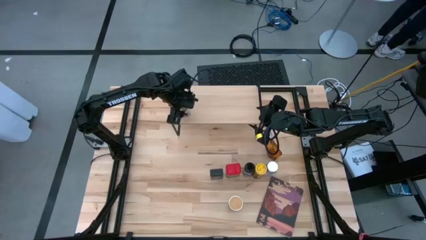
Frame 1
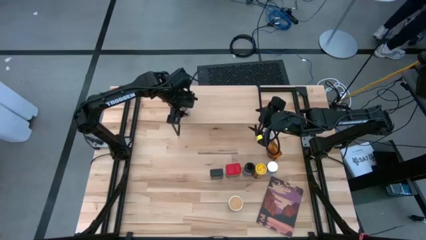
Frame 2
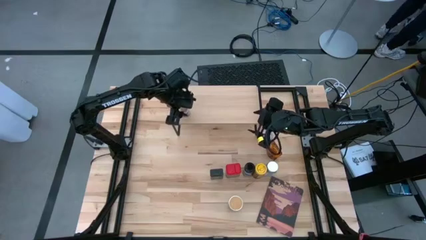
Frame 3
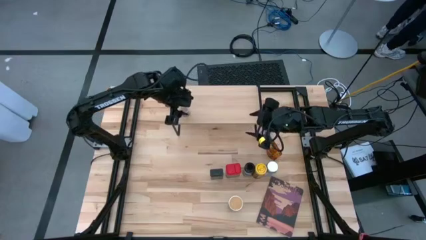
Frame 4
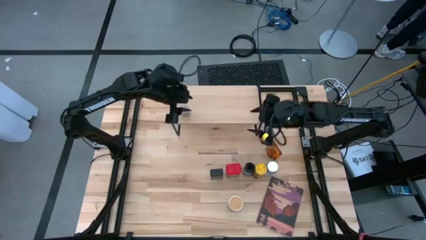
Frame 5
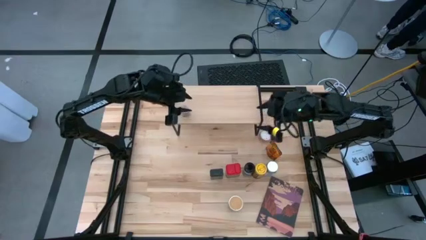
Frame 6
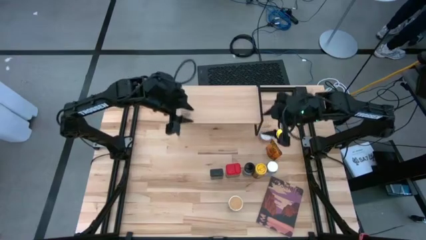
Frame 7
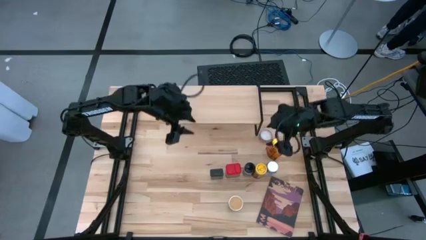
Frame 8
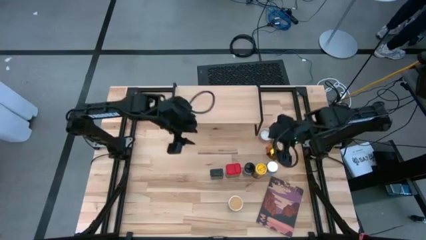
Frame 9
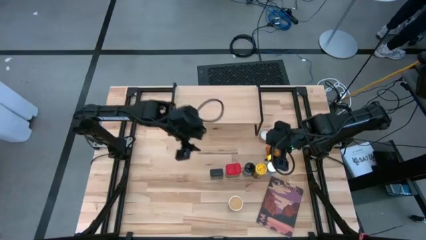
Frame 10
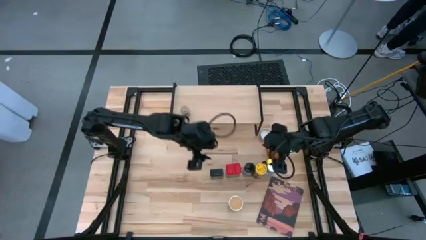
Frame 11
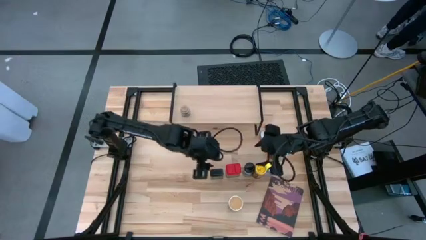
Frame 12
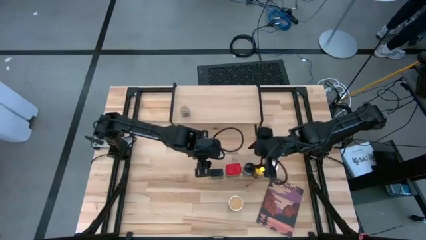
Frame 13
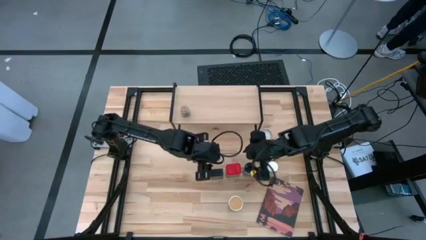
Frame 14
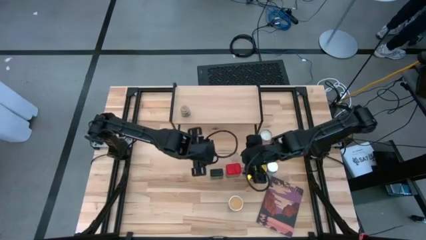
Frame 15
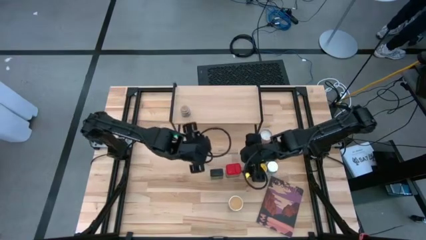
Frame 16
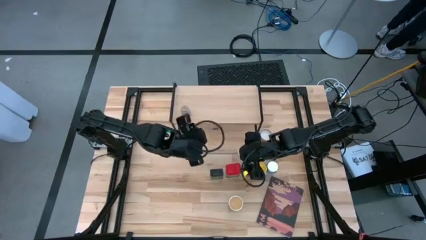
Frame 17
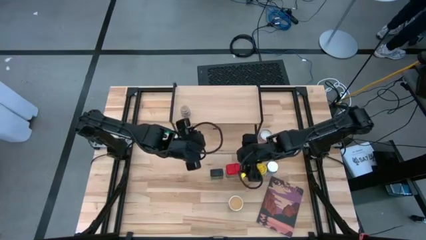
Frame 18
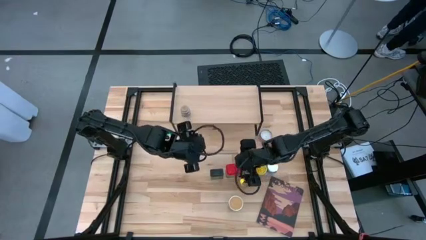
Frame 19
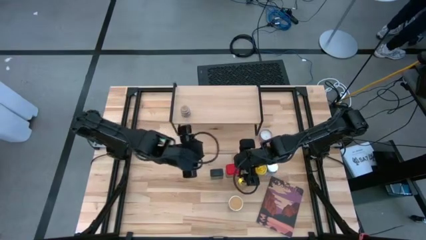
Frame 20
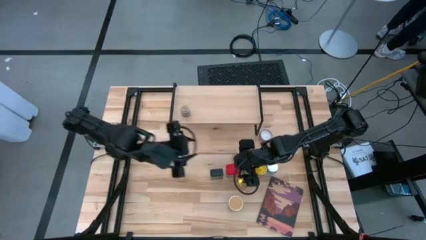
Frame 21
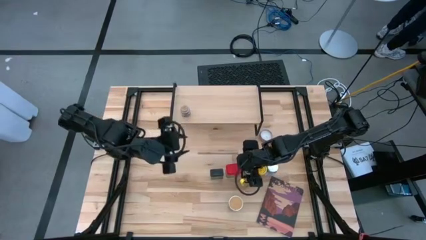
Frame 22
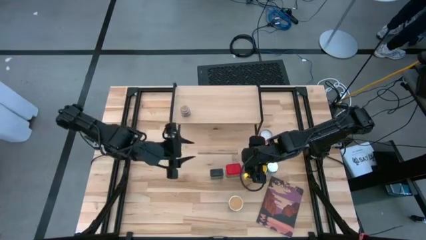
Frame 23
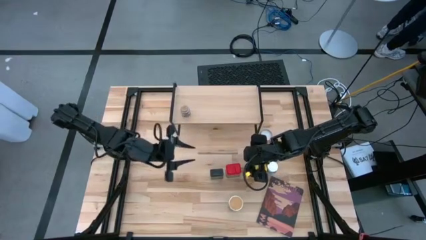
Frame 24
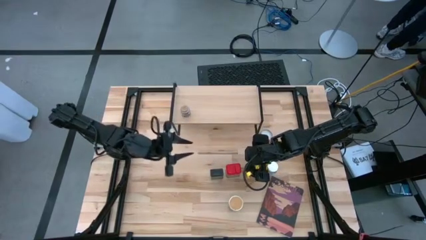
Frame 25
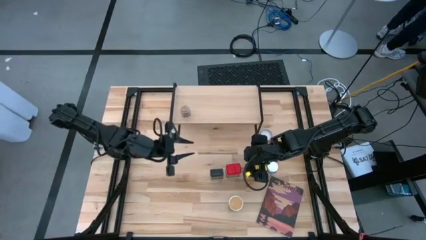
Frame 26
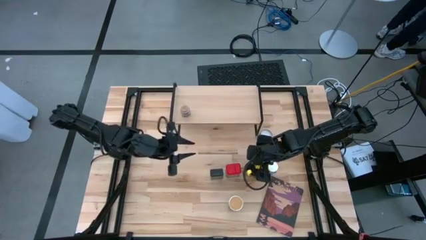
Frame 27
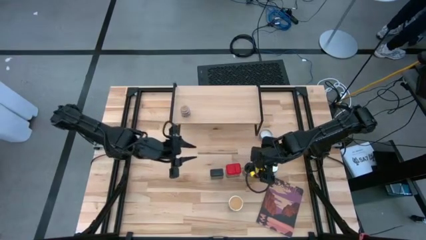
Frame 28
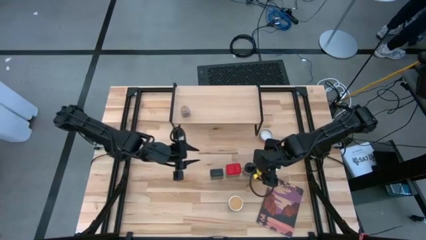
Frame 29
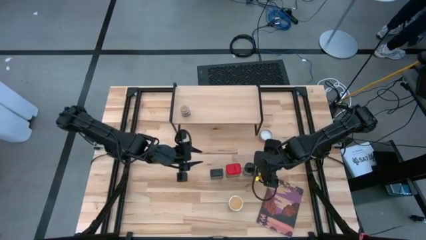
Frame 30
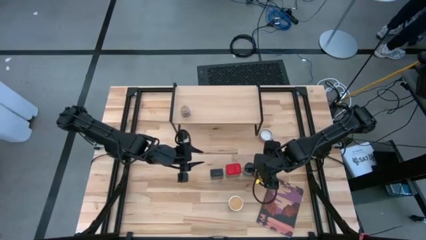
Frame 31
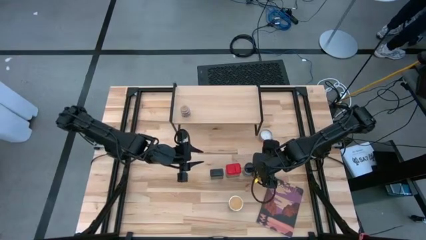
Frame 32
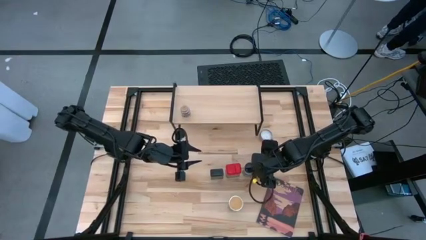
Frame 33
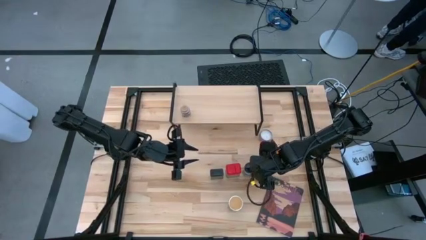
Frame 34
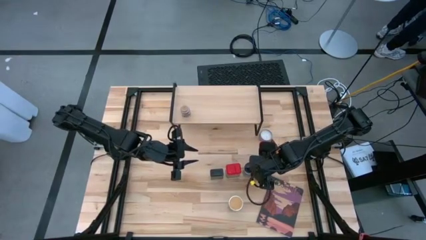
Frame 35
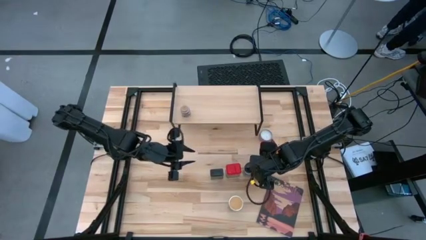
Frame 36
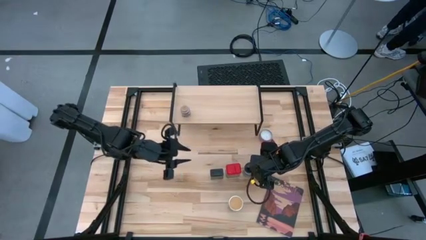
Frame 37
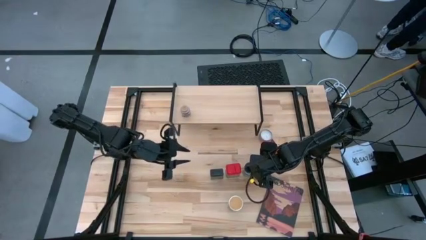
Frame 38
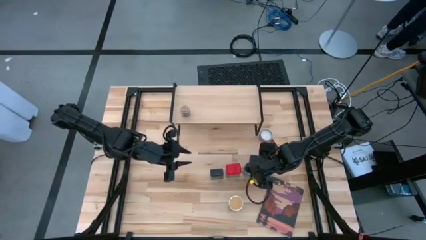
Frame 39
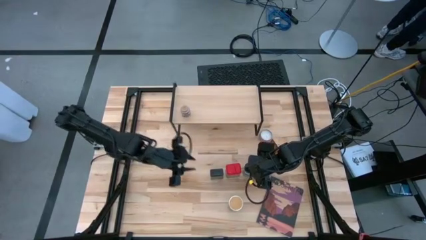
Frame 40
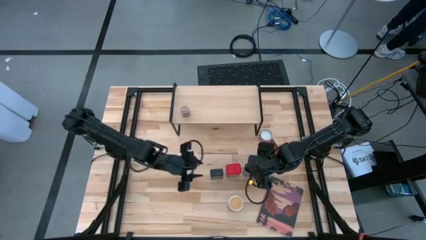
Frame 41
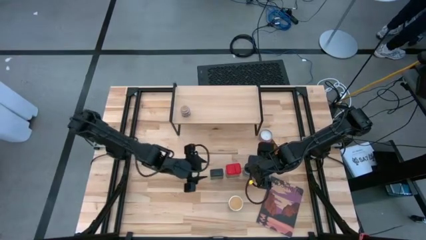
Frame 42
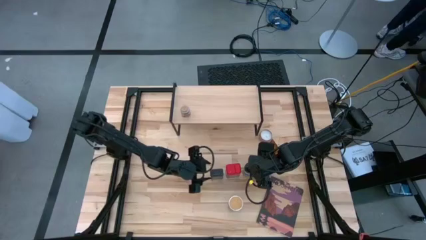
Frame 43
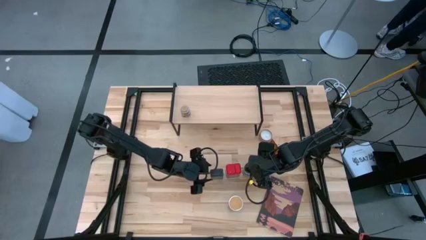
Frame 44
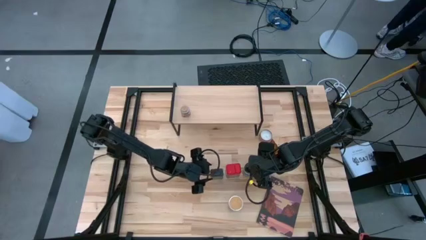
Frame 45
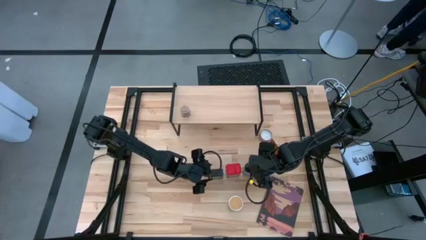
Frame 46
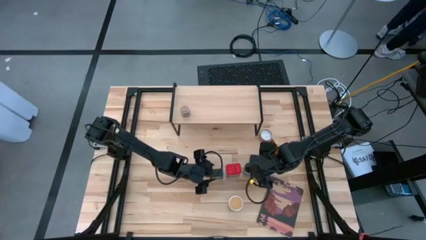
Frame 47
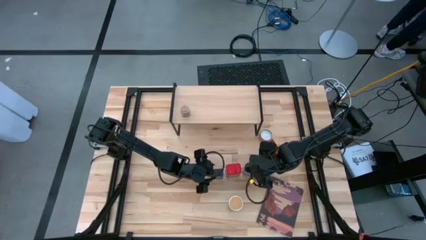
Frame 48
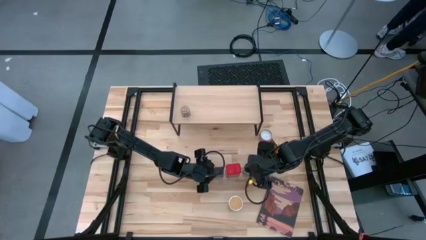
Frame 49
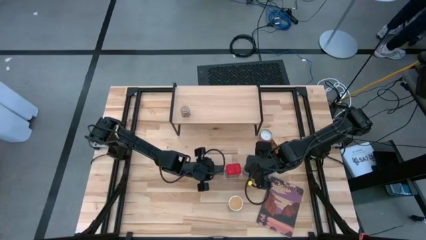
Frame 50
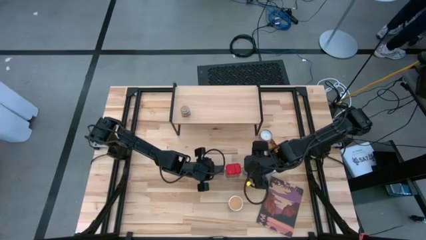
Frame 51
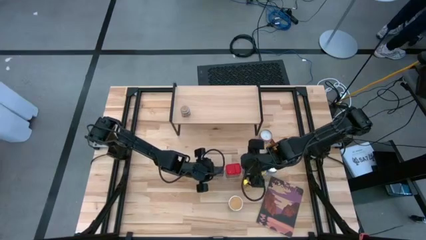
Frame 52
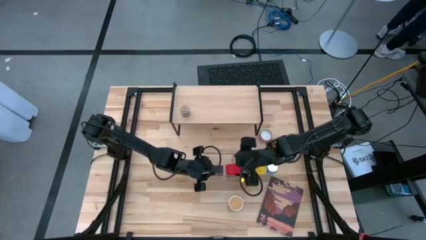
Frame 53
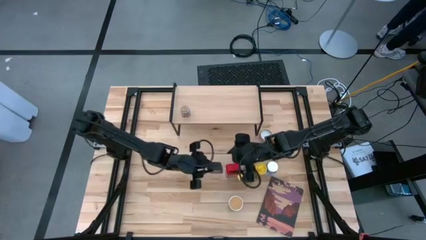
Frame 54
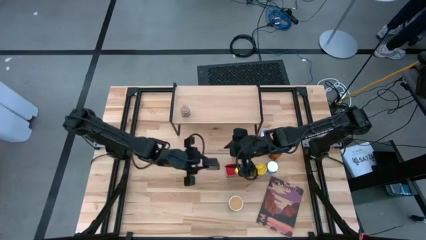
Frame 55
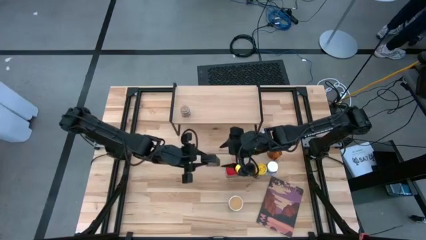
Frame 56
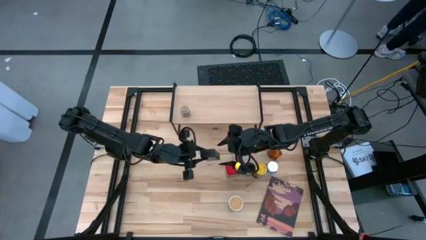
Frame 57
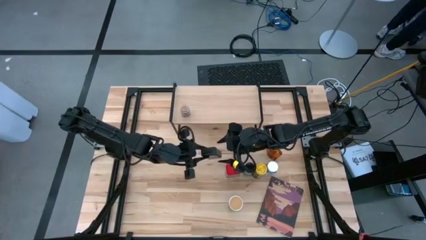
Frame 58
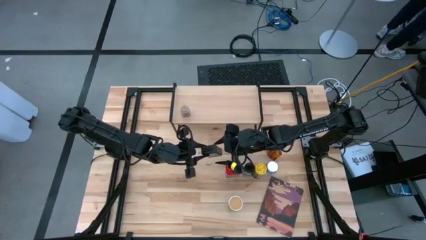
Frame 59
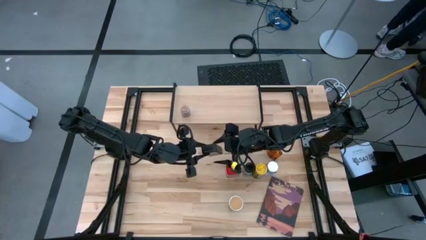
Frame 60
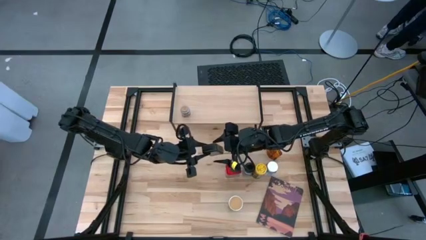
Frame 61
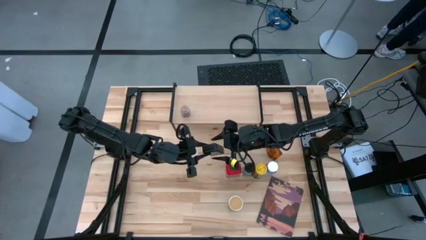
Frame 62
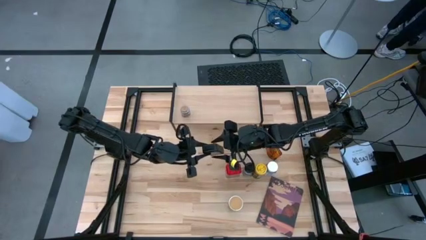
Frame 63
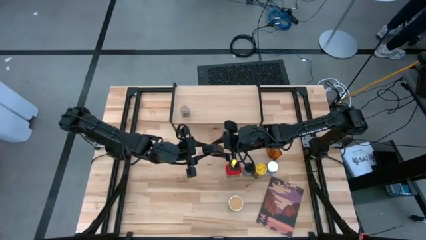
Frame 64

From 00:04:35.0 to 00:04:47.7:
Task: Shelf spices
Put a green packet of spices on the shelf

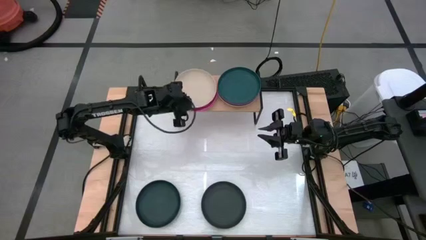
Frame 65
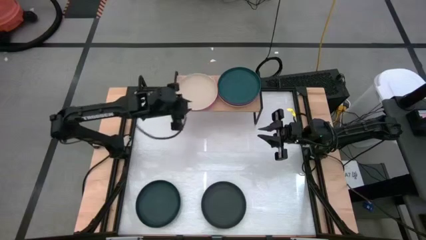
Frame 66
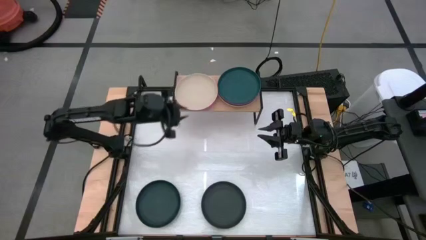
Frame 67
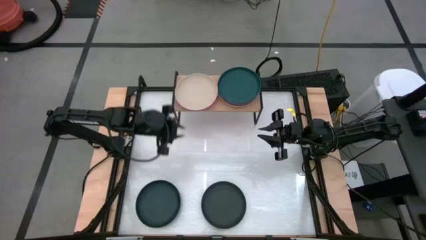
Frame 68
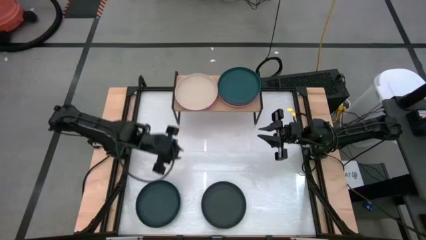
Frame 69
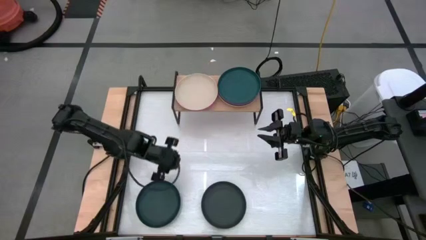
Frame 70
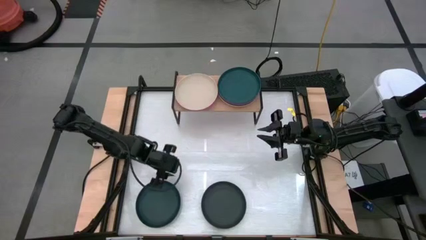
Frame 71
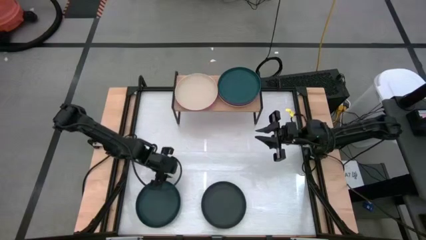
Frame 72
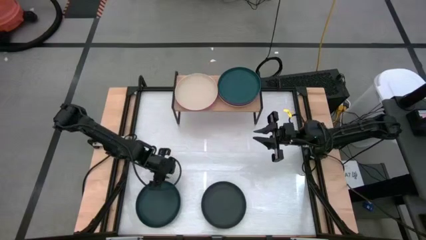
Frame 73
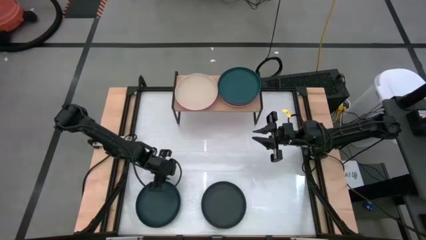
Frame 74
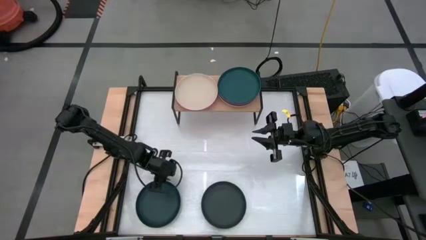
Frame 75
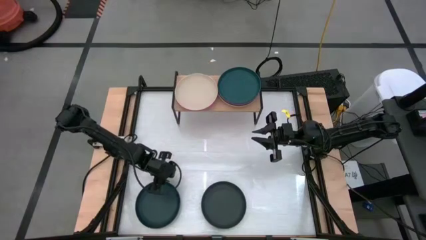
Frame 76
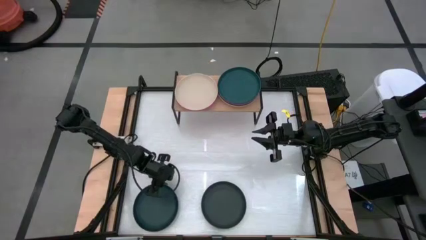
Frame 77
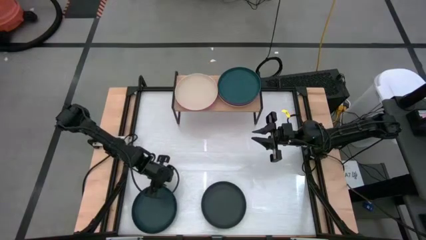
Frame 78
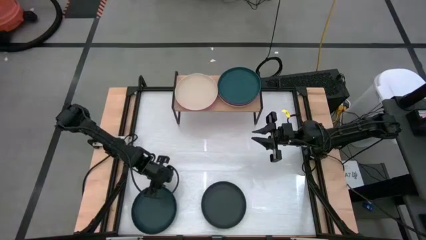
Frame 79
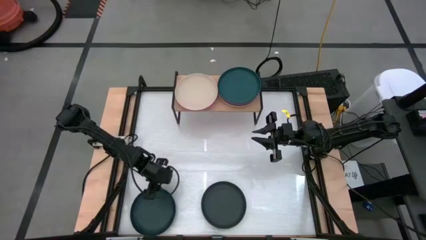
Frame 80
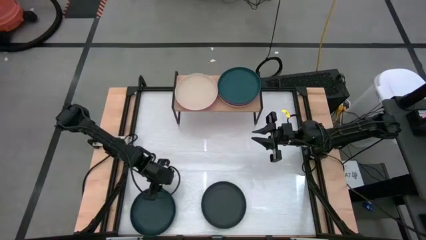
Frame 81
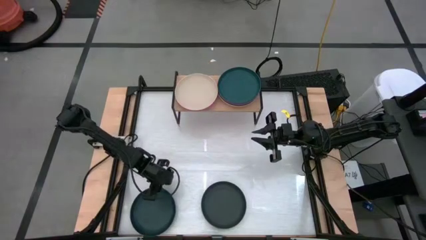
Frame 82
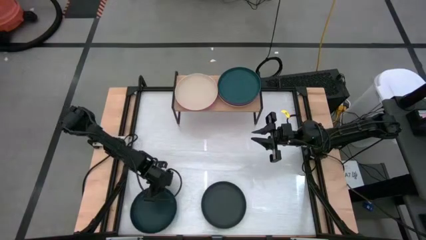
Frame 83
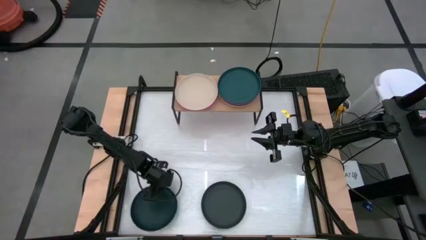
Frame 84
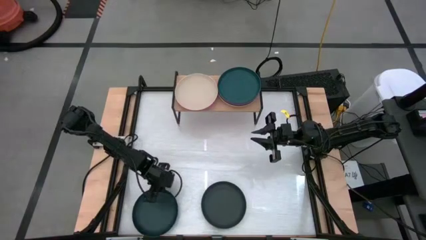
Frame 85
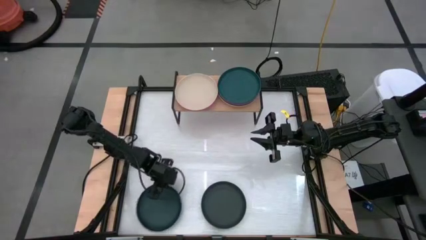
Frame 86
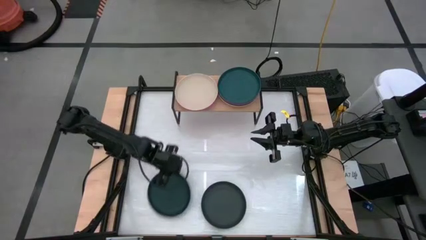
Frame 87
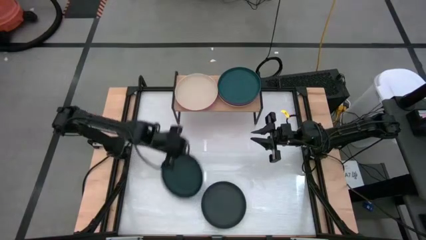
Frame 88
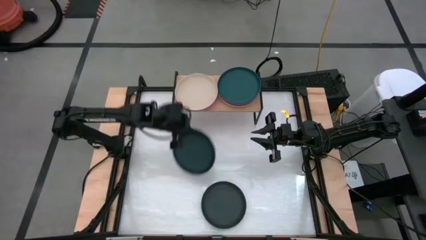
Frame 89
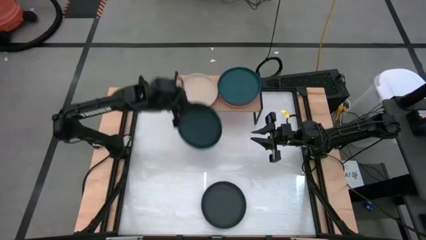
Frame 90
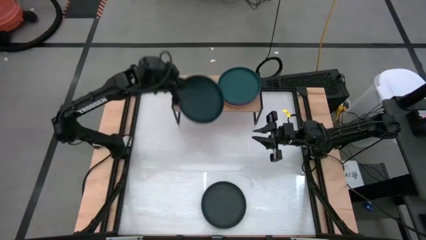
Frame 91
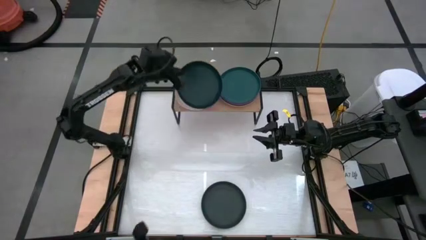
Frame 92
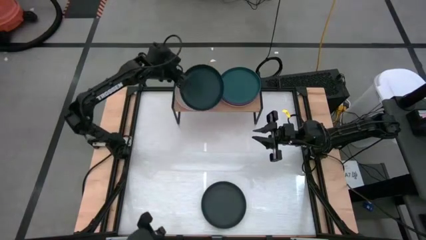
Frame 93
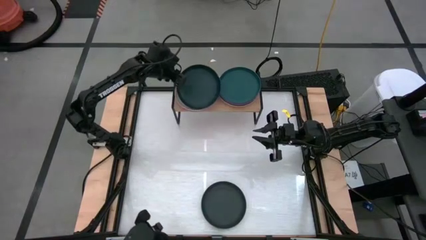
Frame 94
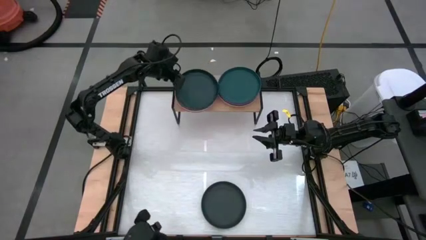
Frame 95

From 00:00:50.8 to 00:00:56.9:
Task: Place and stack plates onto a shelf
Stack the dark blue plate on top of the white plate on the shelf
